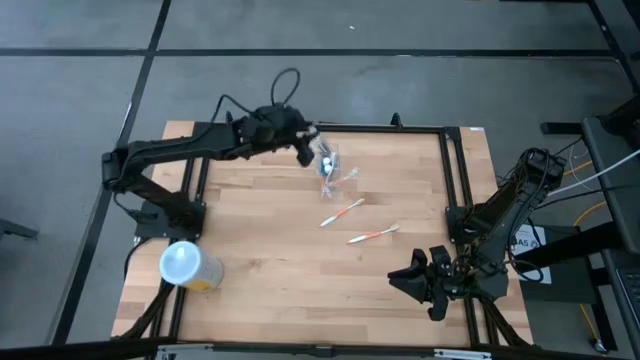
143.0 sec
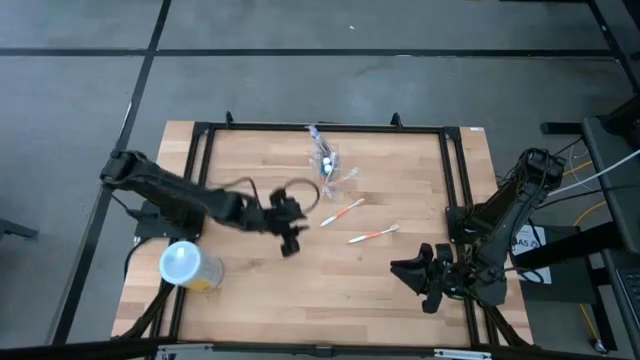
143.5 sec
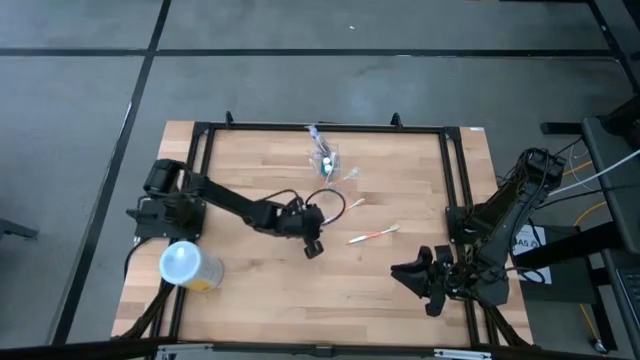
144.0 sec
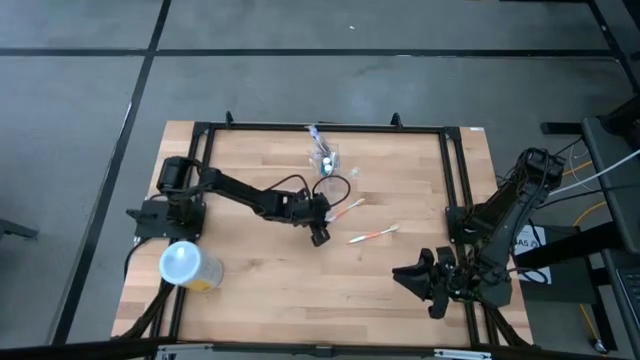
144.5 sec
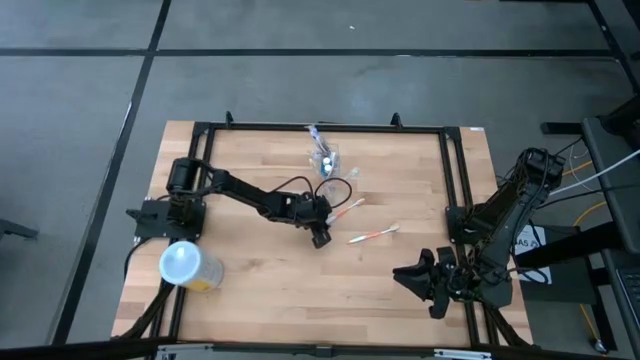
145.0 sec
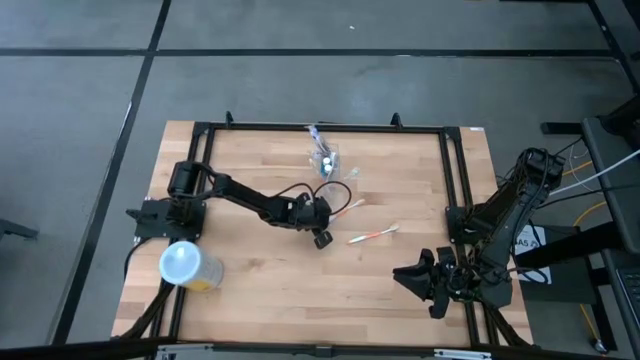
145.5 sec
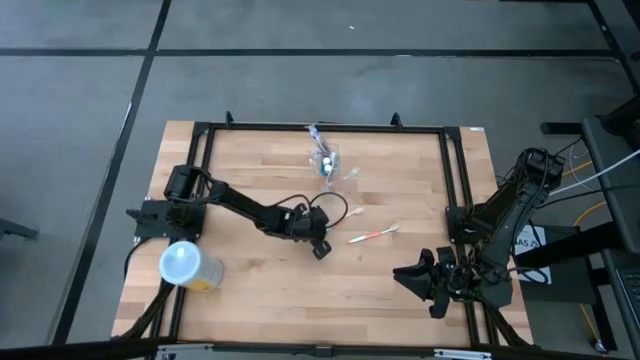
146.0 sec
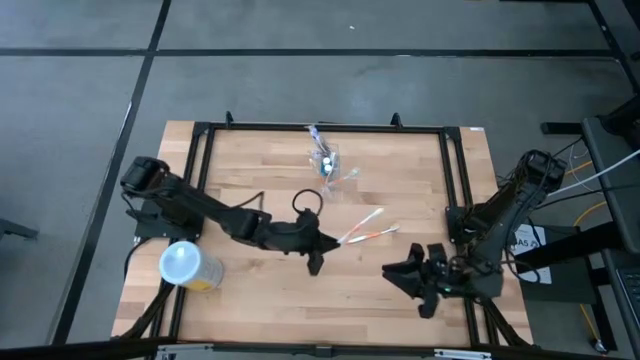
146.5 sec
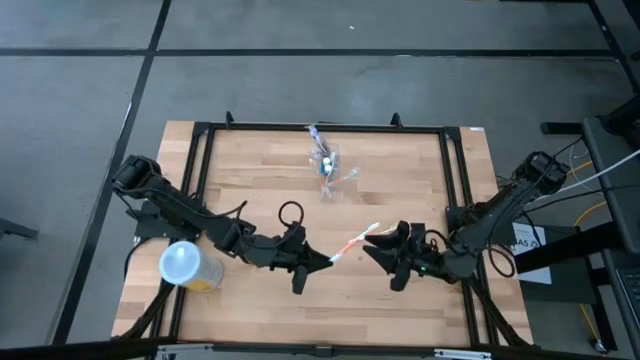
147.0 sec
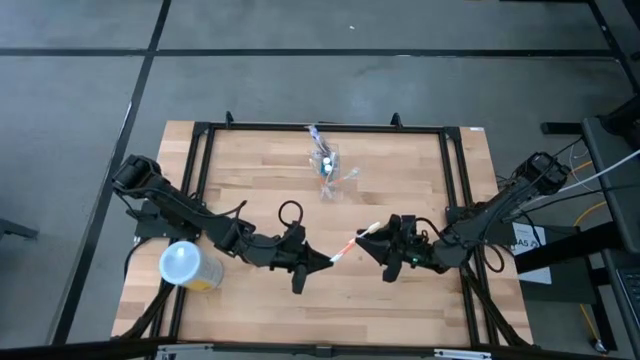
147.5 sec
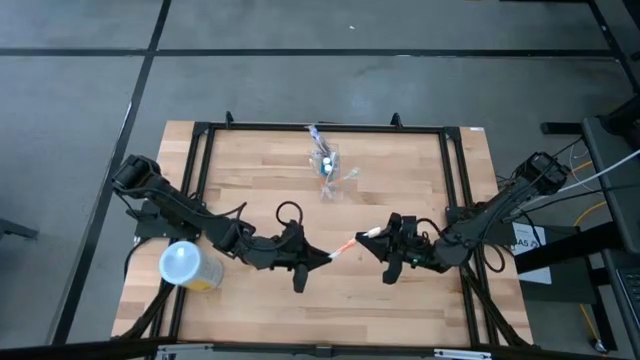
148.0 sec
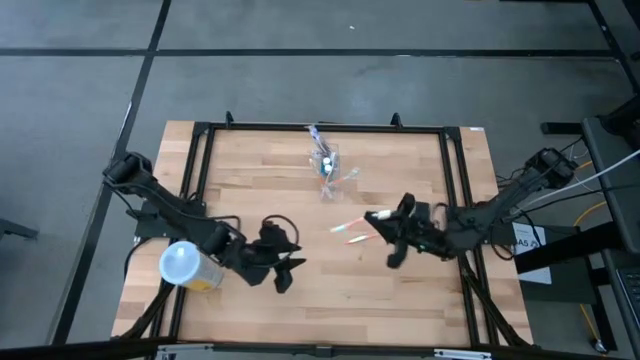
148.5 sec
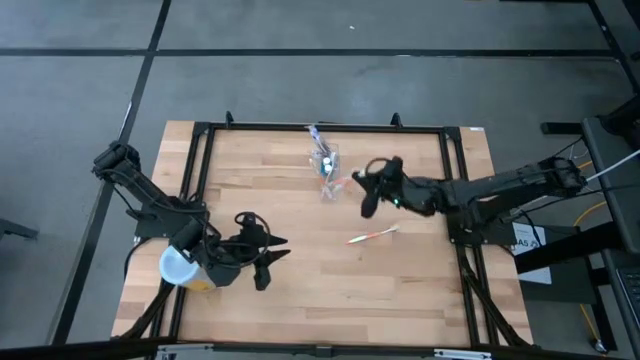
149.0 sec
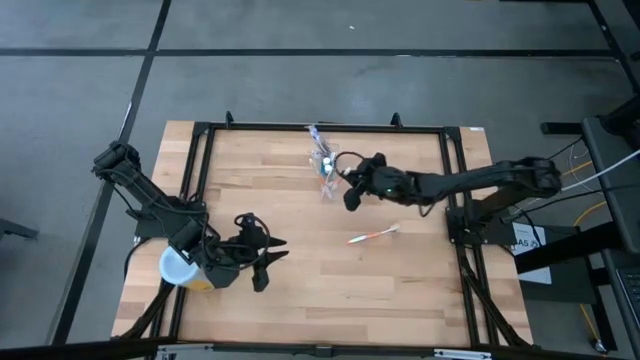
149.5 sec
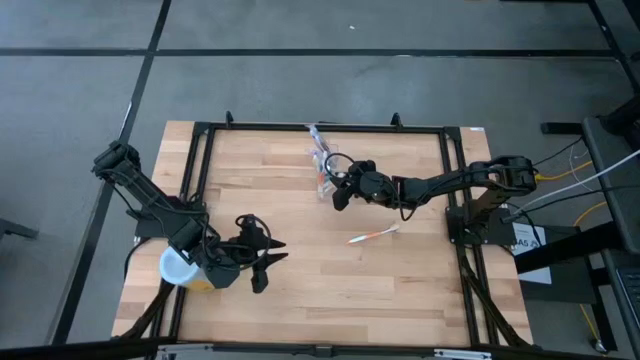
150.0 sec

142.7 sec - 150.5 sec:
Task: Pick & Place toothbrushing station
Put the orange toothbrush into the transparent organizer

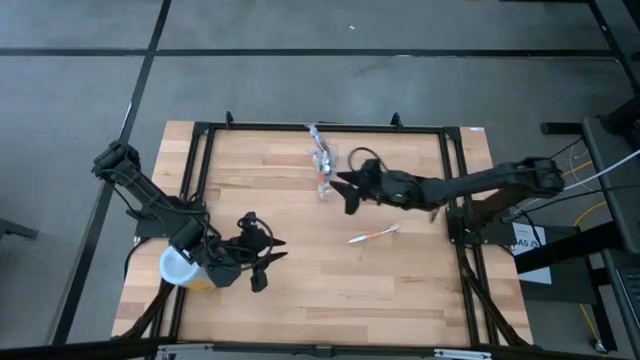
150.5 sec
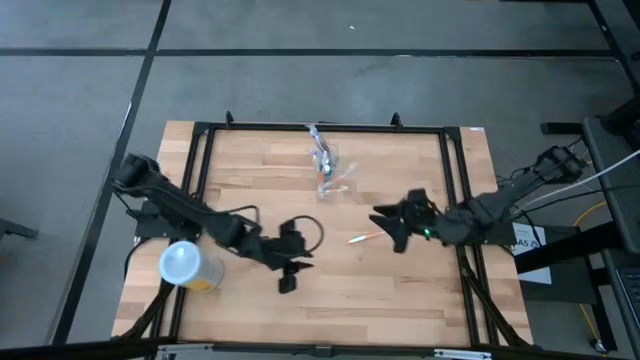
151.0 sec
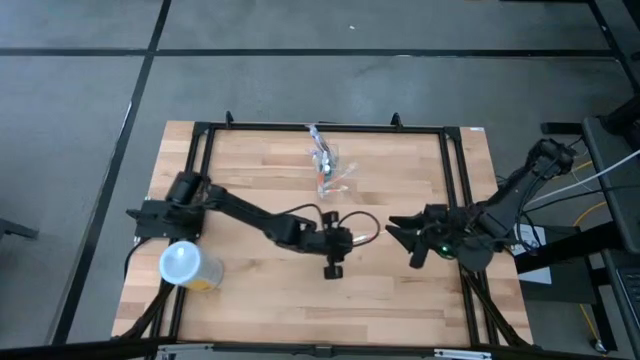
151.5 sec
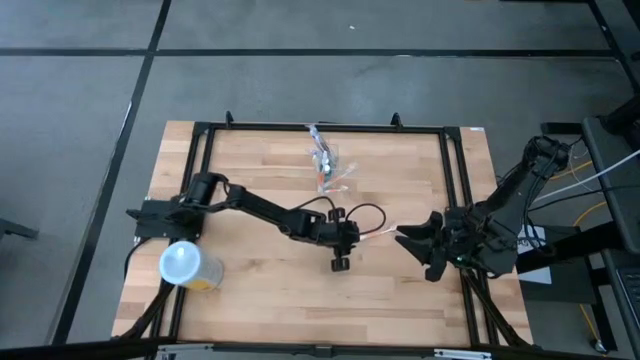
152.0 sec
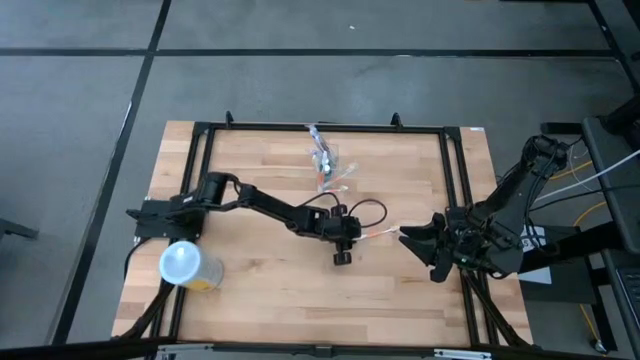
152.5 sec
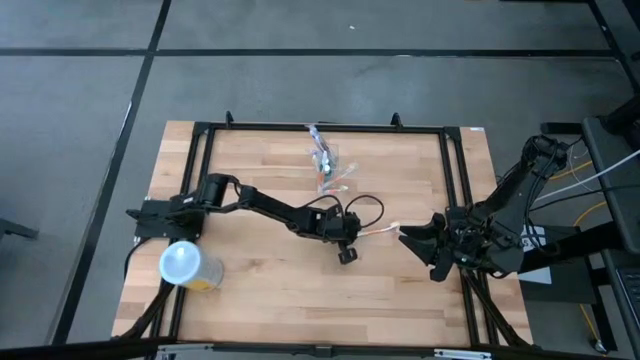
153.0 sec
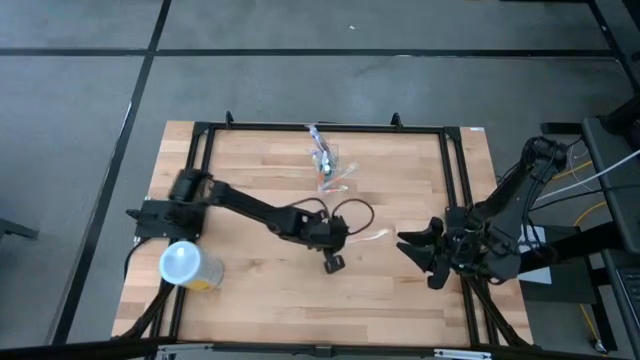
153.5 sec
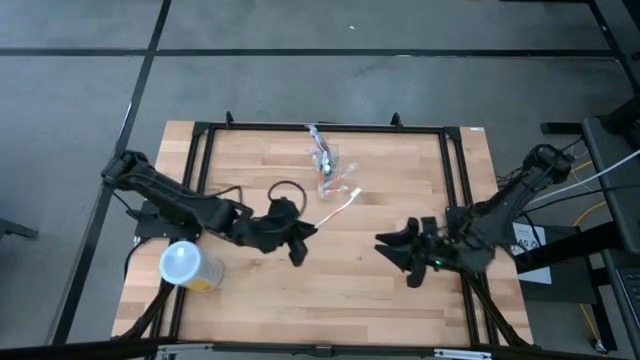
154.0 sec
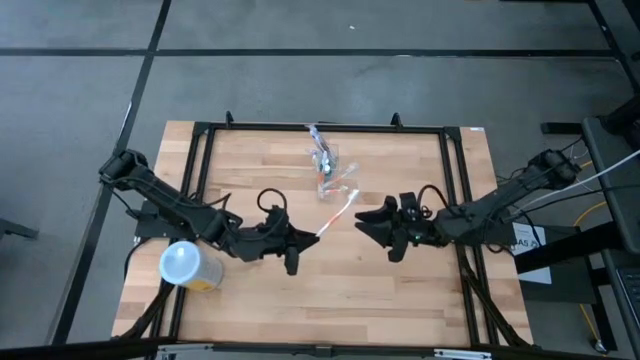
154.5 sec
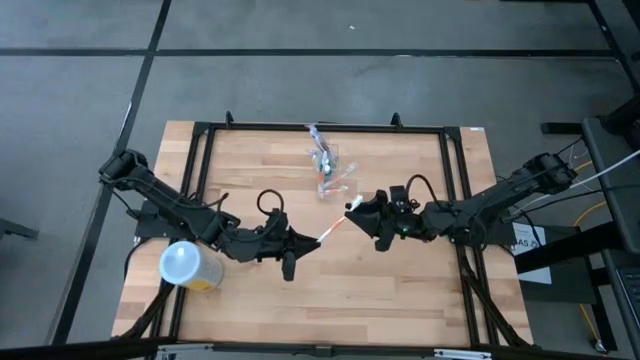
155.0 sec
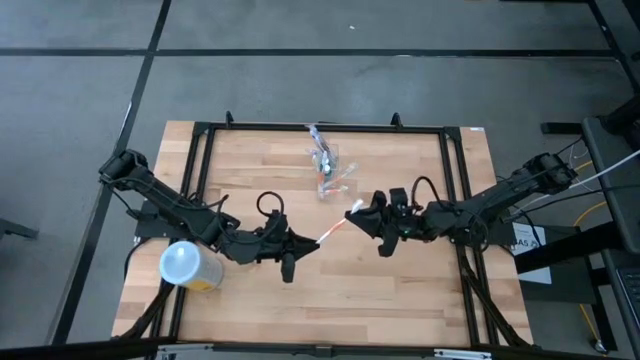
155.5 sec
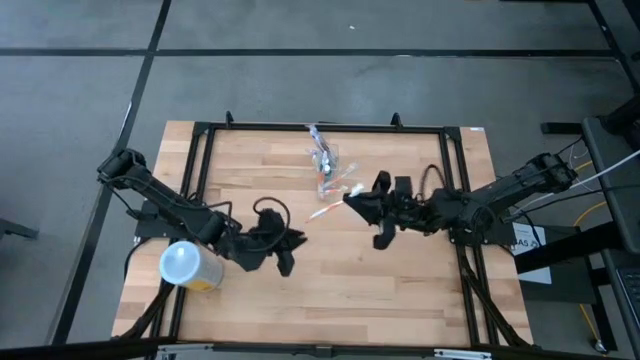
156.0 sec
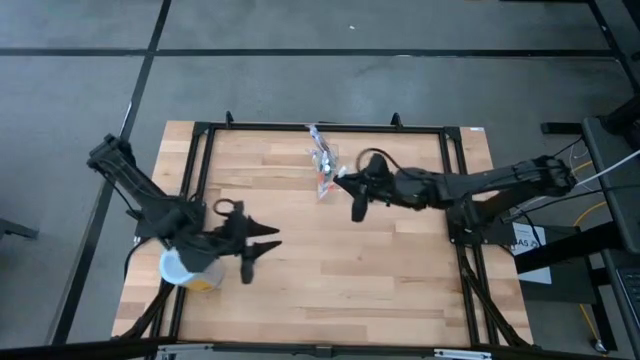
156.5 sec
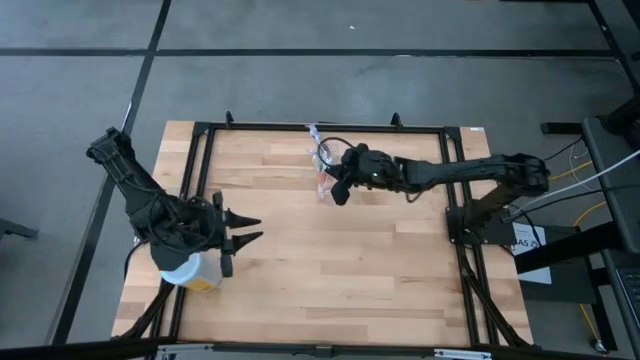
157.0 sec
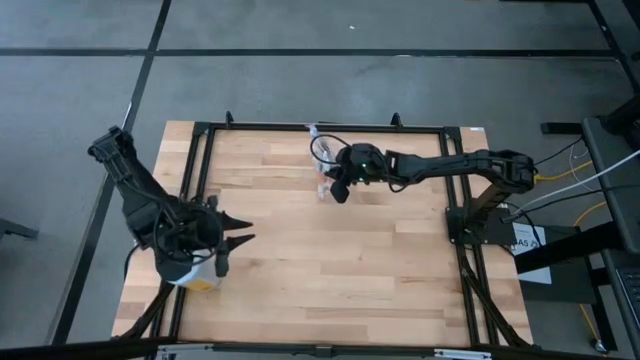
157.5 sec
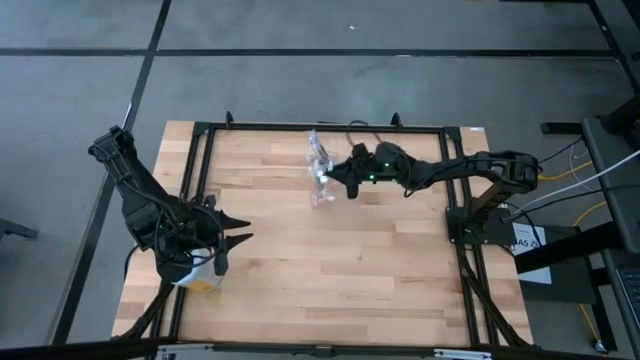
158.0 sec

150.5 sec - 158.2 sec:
Put the orange toothbrush into the transparent organizer

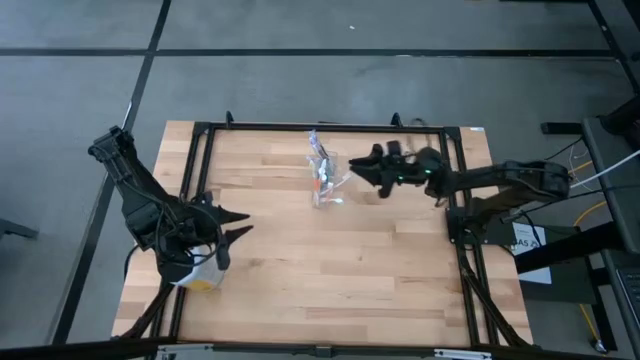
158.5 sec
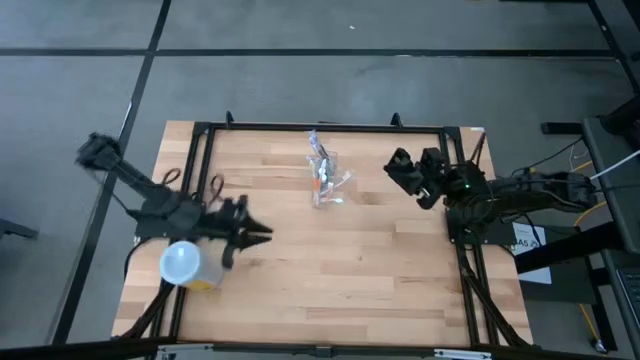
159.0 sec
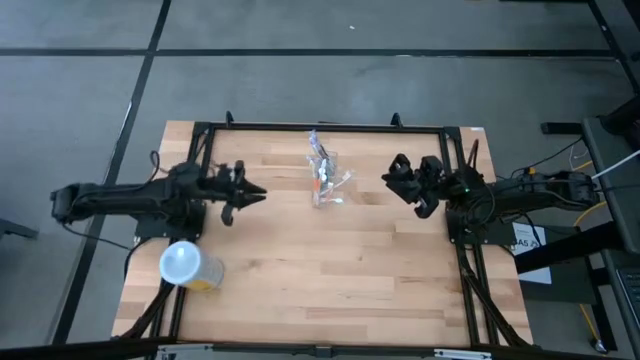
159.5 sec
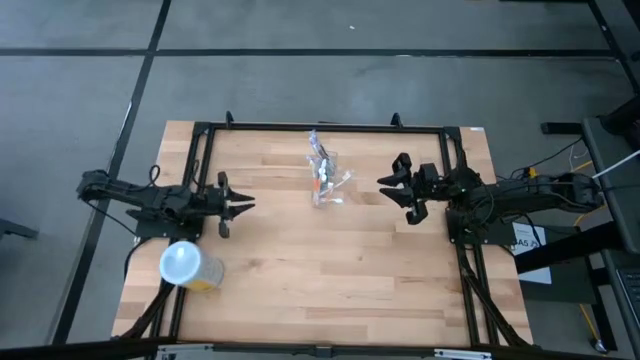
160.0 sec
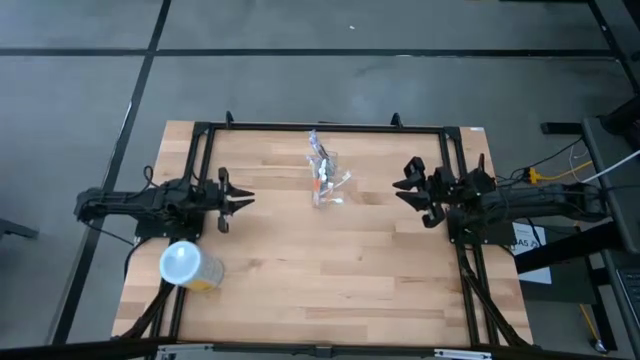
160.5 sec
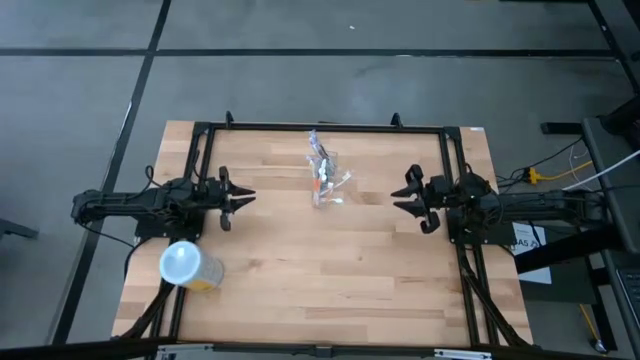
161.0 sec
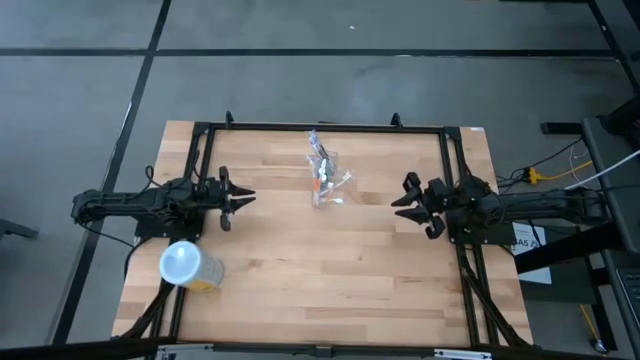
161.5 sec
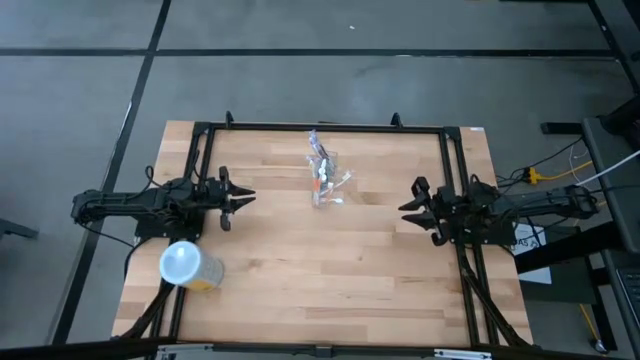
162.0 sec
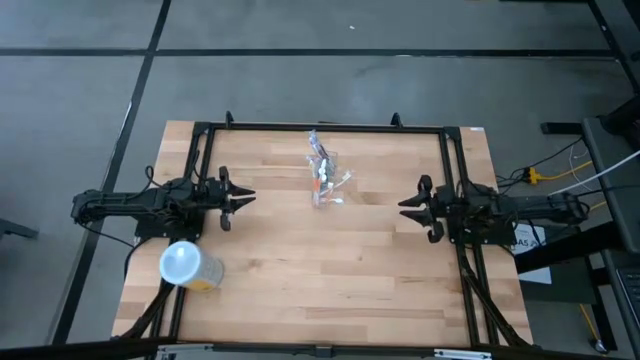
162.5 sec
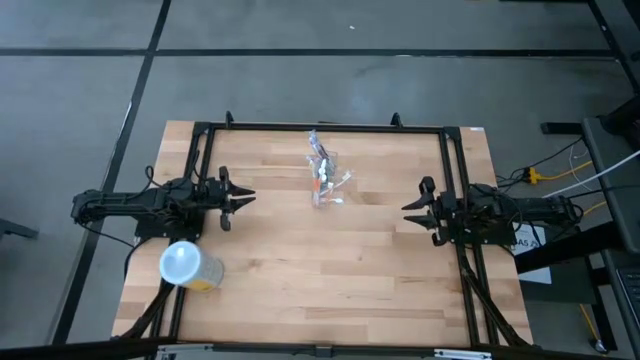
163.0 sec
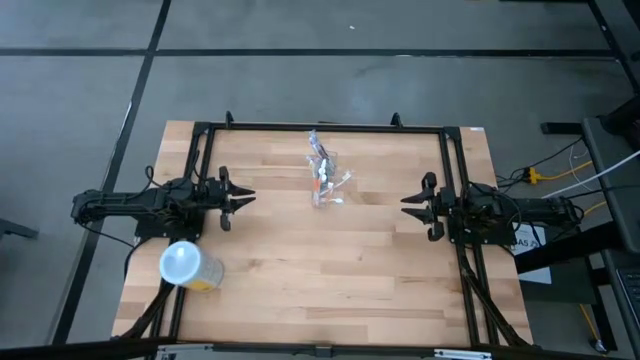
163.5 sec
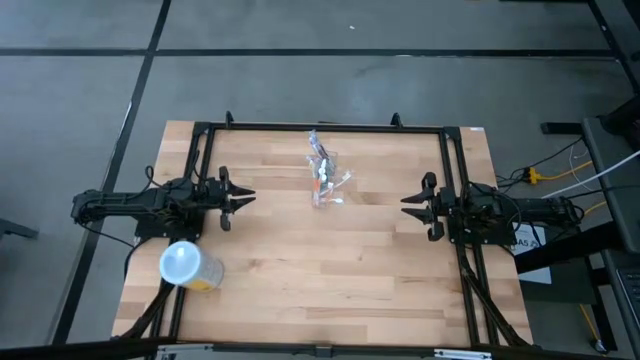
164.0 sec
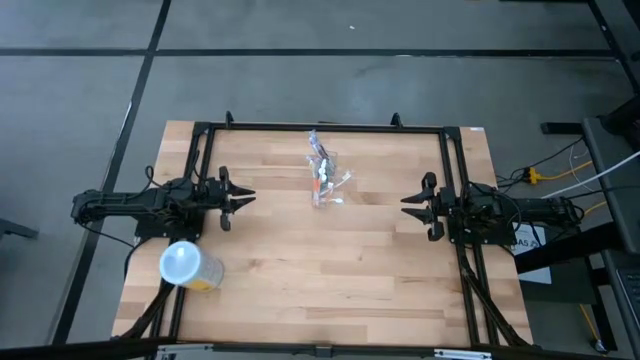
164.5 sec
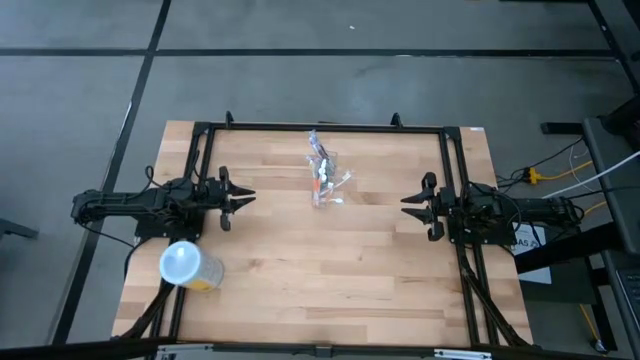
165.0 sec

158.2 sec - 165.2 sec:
Return to Home Position
